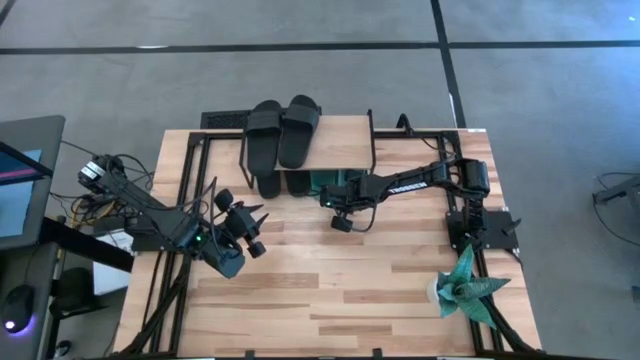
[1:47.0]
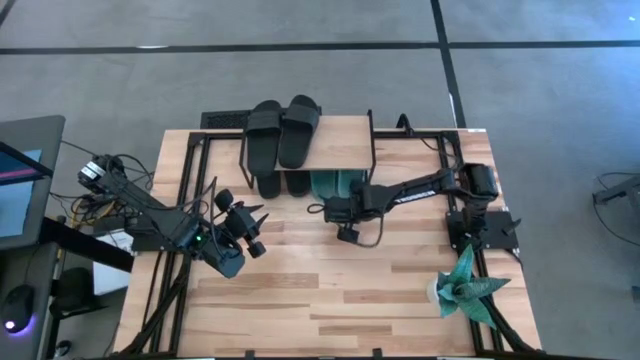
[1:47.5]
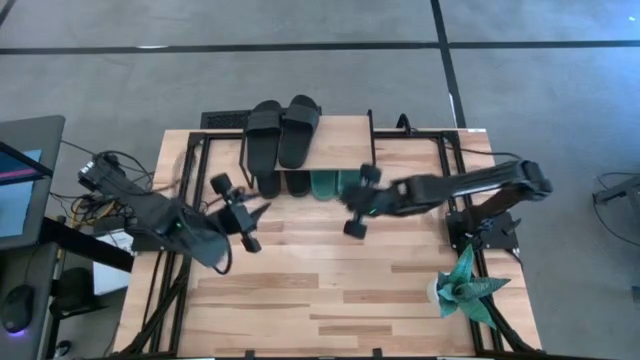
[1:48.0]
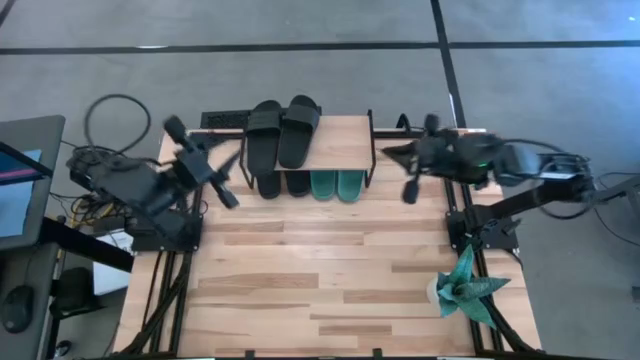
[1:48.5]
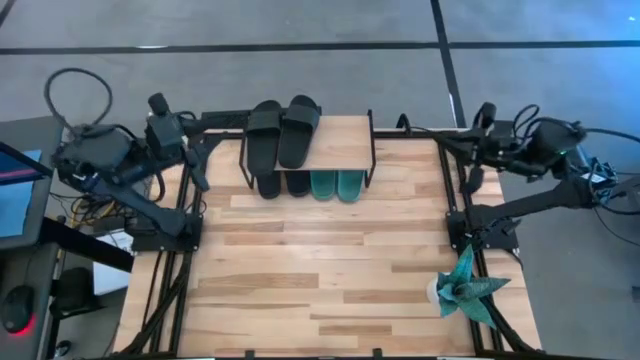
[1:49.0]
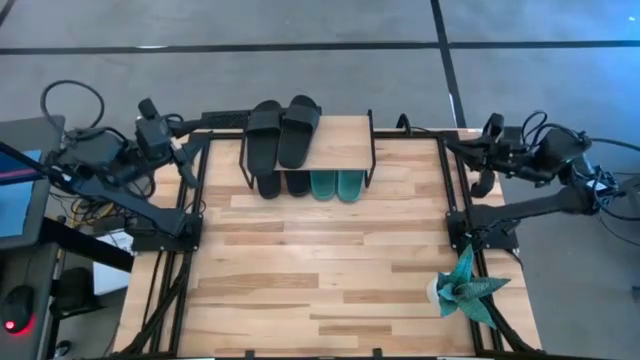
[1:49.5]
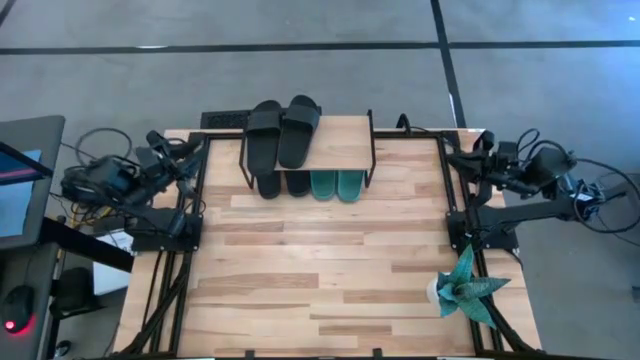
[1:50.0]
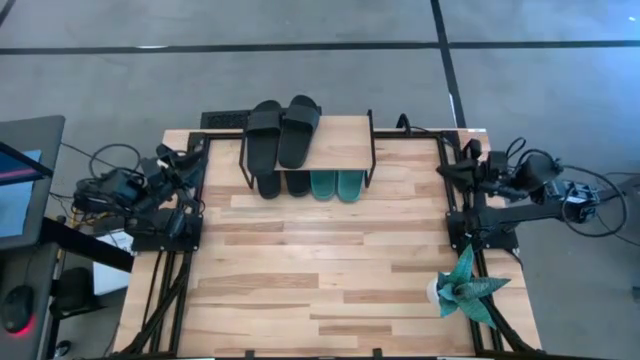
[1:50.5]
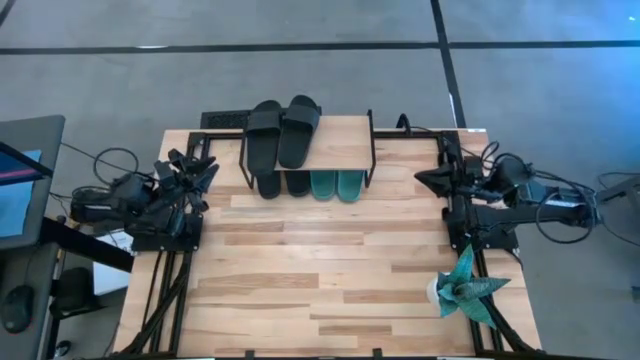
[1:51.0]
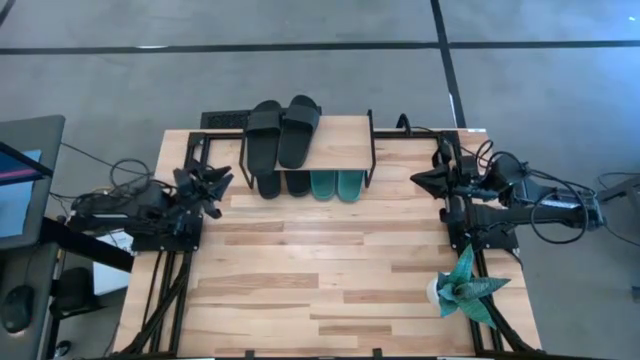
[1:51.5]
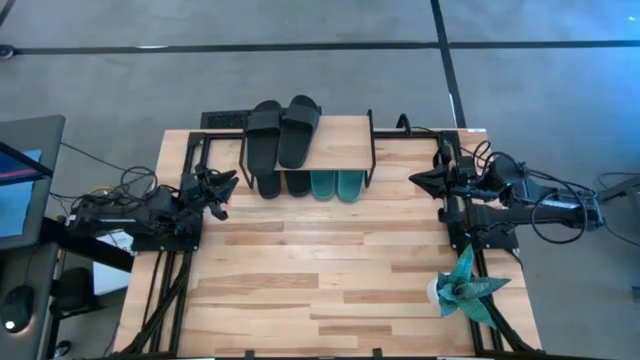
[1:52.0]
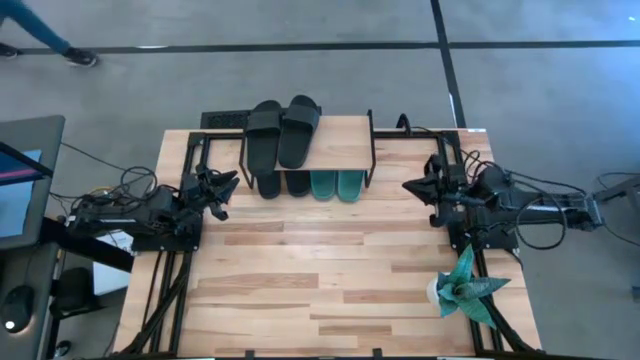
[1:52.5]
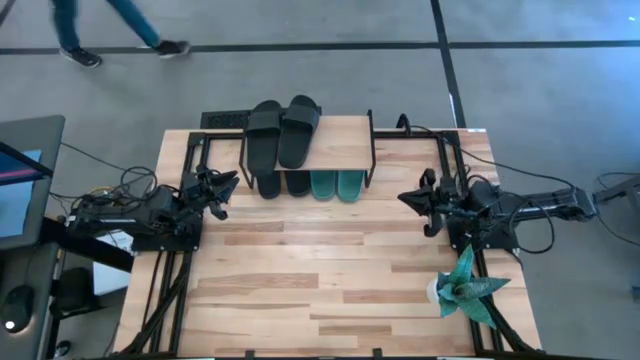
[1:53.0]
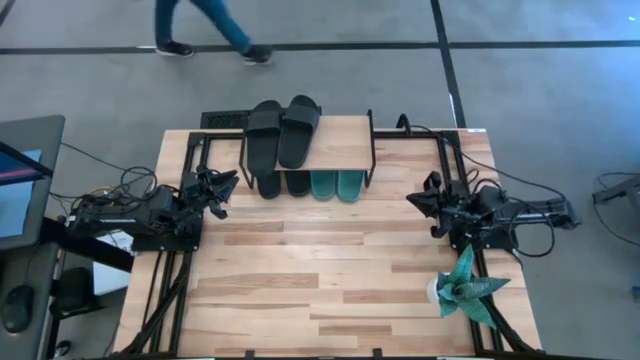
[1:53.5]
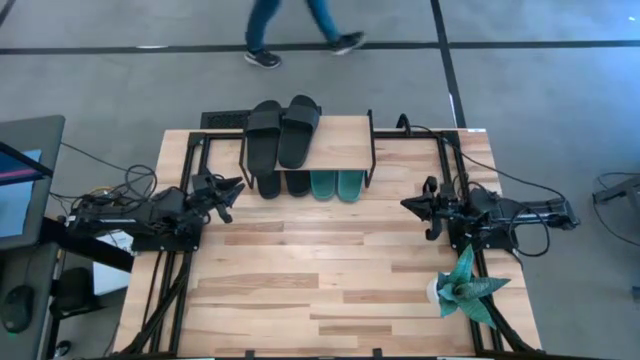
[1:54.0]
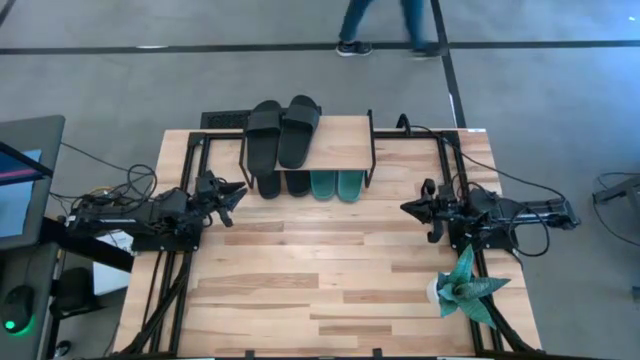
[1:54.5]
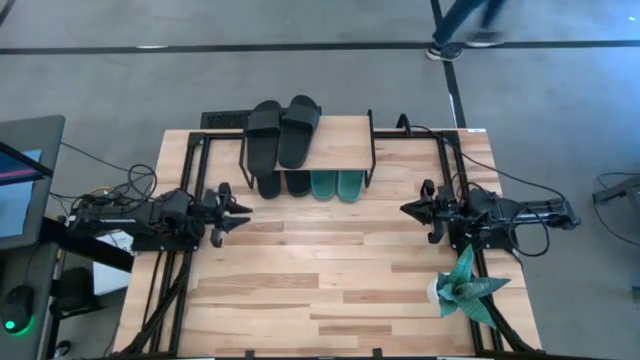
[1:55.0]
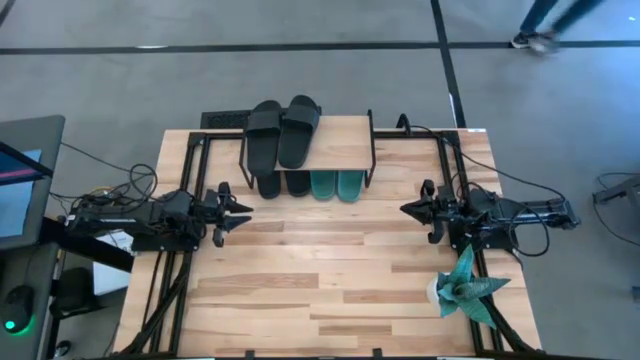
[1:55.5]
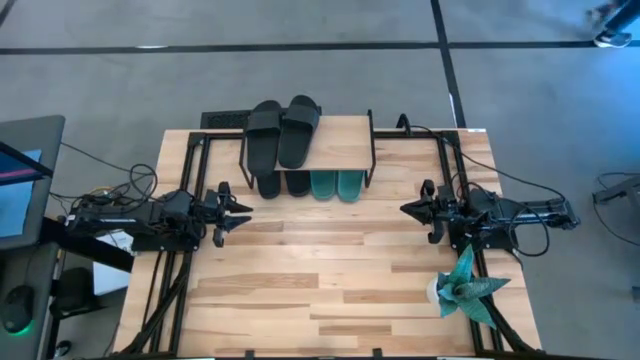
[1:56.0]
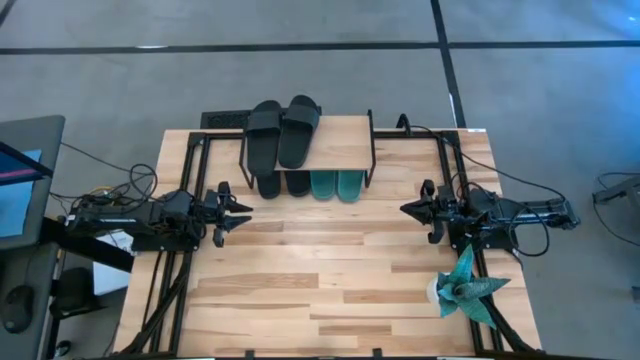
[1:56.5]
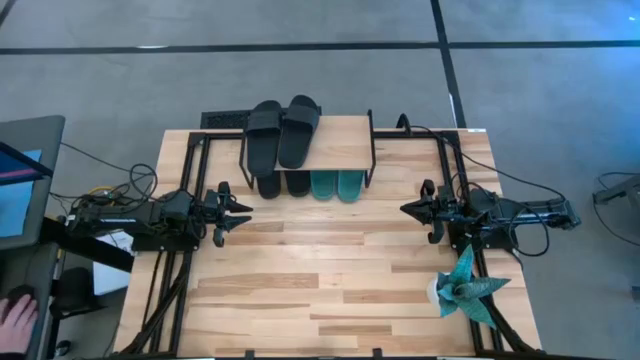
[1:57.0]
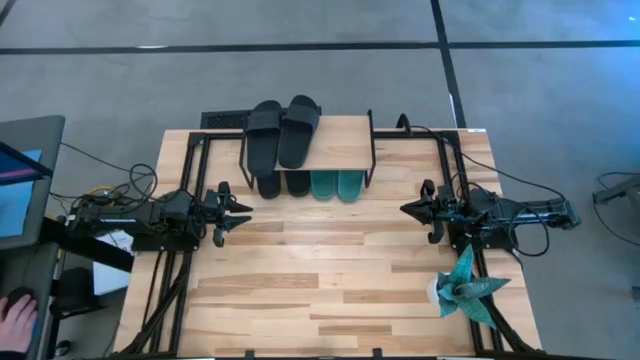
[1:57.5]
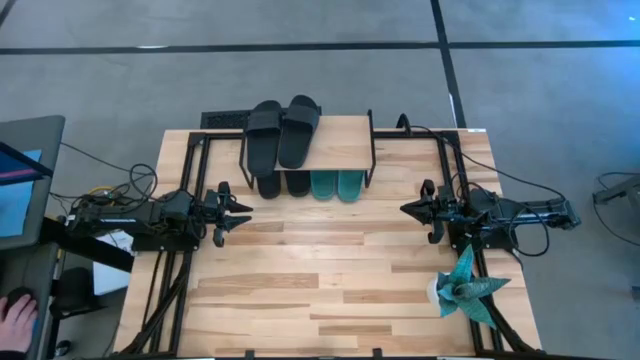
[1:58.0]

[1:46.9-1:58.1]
Task: Pick and place slides into the shelf
Return to Home Position

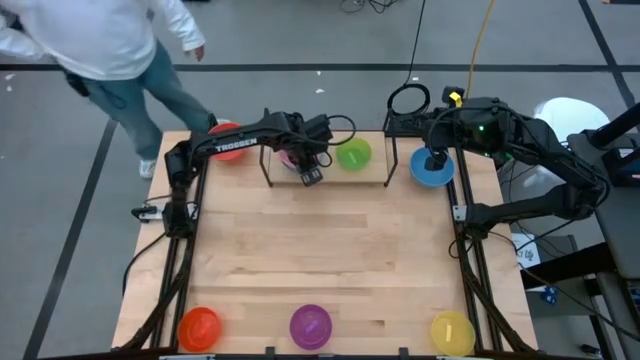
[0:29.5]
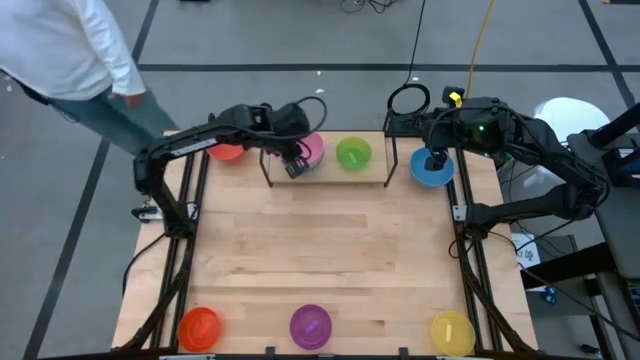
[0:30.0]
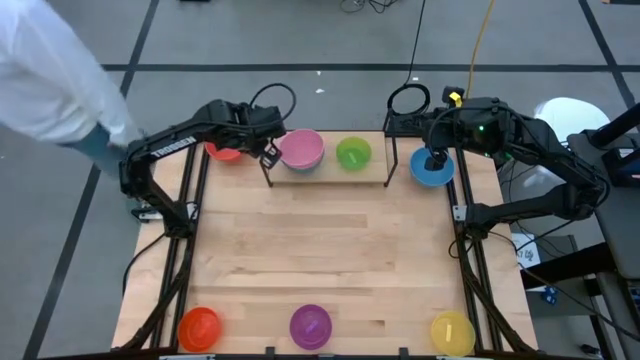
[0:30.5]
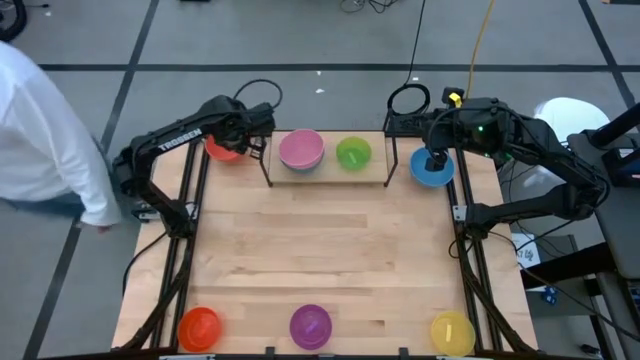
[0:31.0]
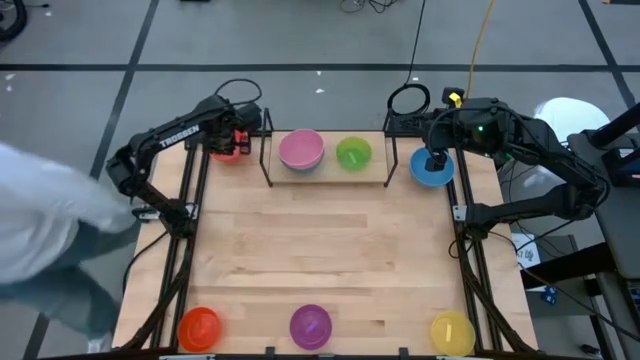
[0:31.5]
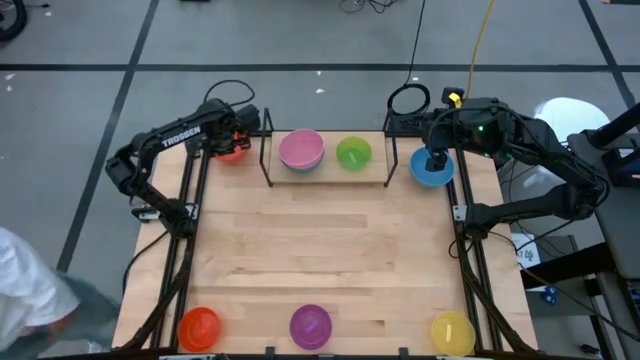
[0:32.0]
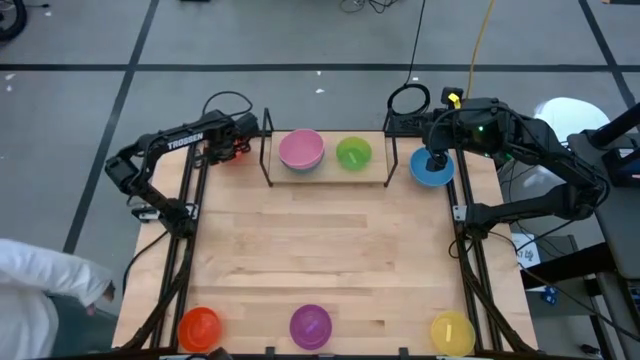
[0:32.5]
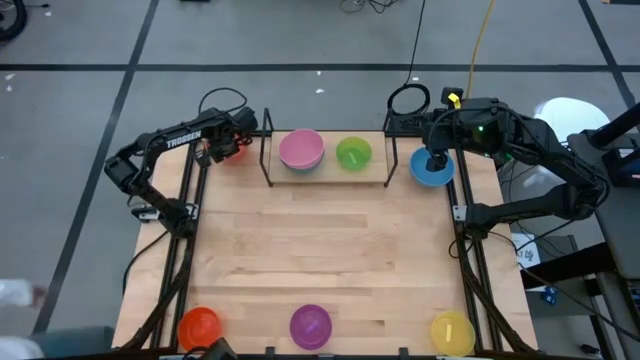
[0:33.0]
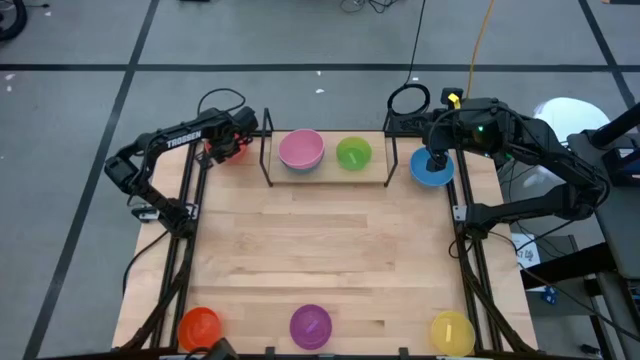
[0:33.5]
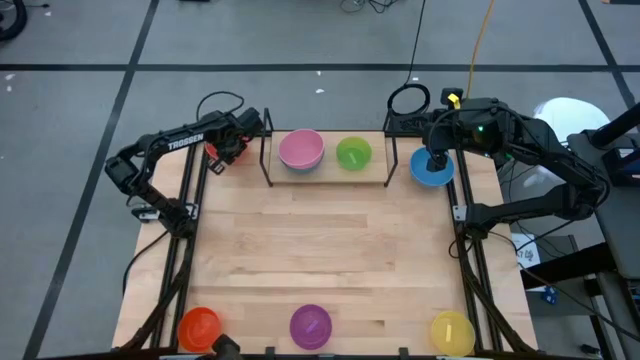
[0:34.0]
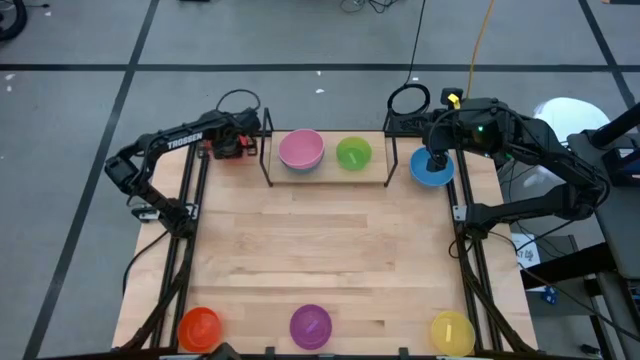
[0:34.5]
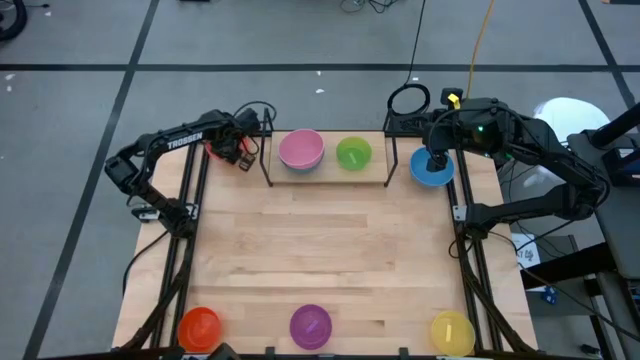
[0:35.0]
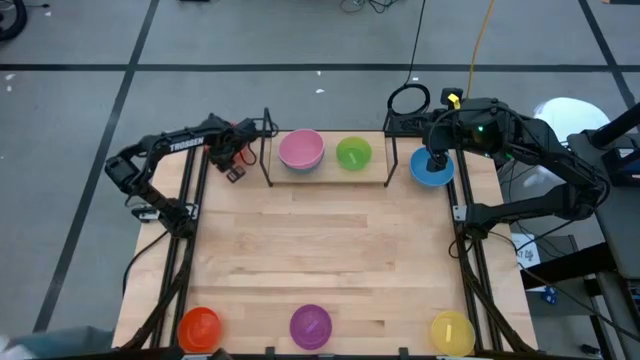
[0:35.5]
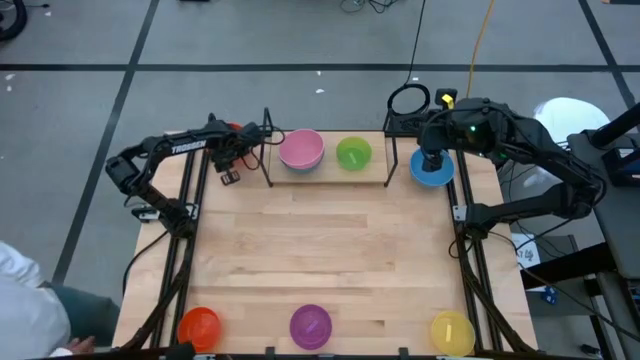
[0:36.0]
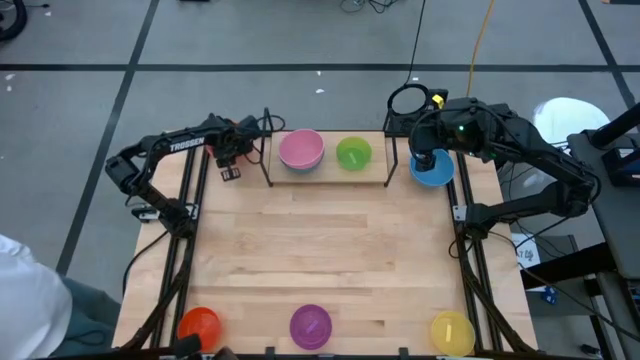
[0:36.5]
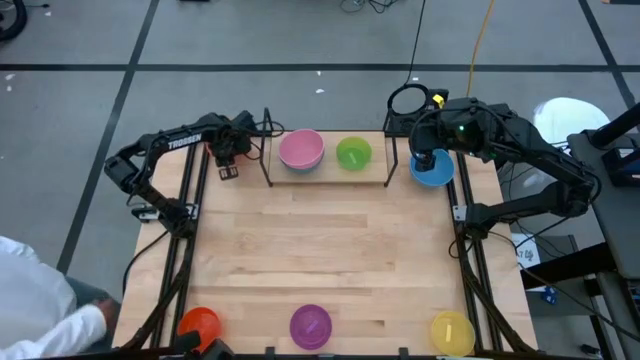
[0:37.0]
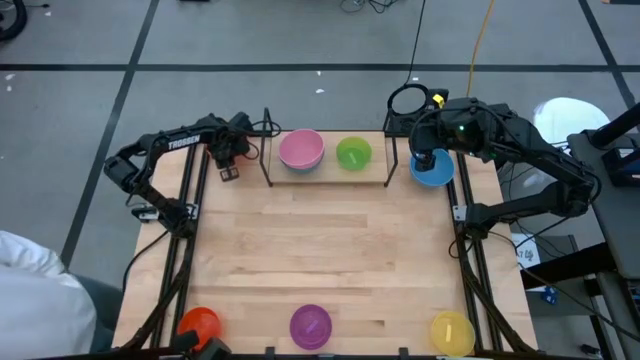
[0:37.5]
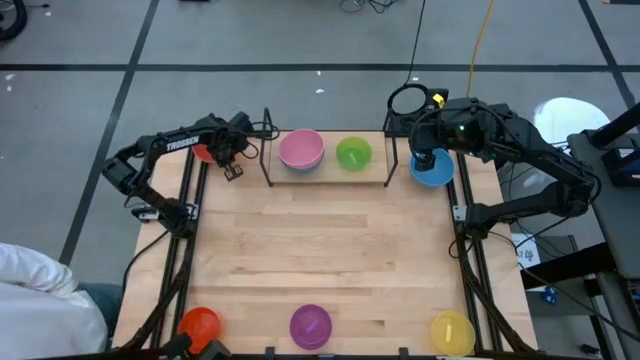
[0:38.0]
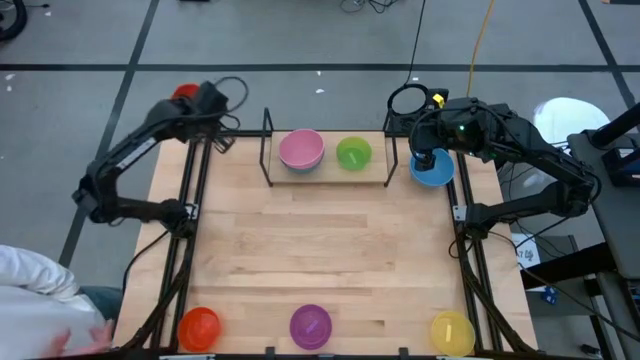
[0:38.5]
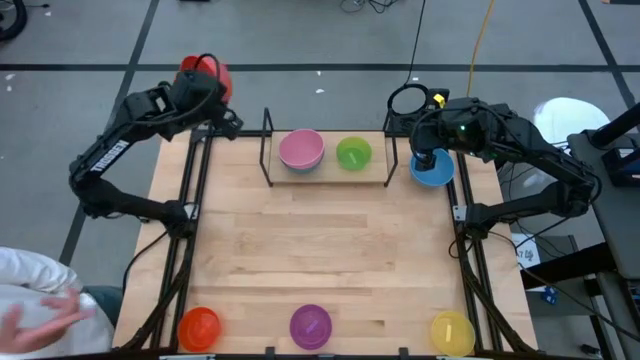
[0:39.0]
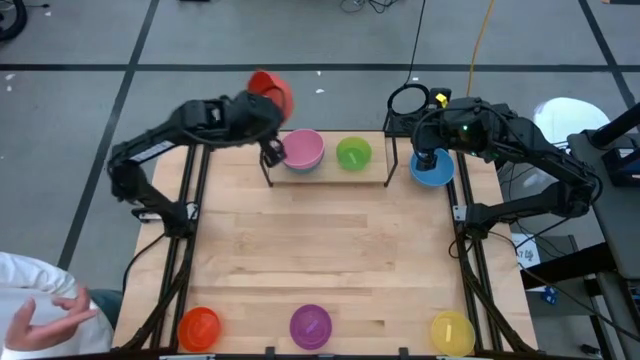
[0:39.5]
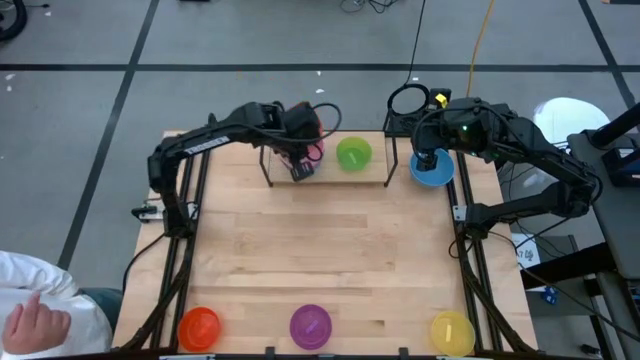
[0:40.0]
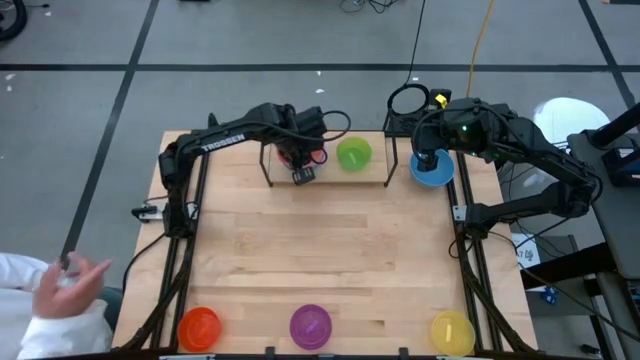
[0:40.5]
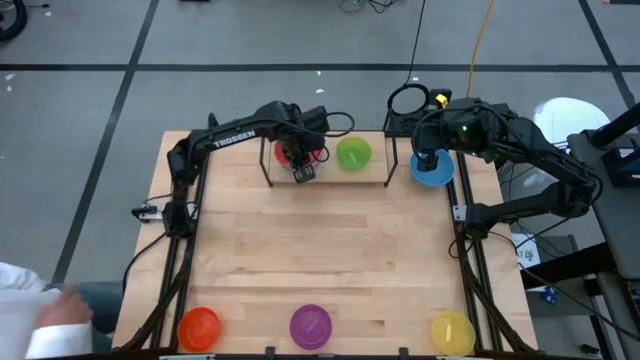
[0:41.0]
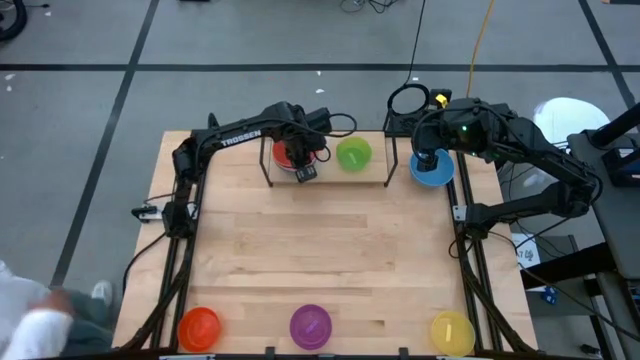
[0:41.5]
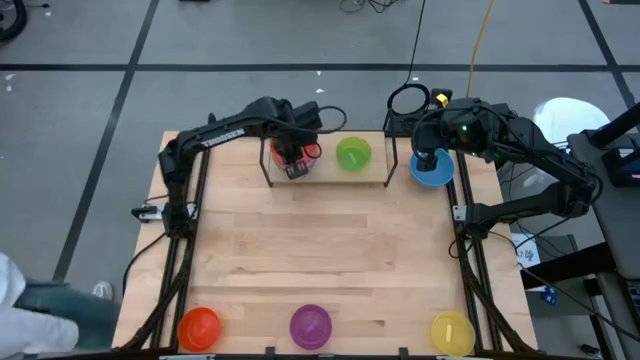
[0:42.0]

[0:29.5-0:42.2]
Task: Place and stack bowls onto a shelf
Stack the orange bowl on top of the pink bowl on the shelf
